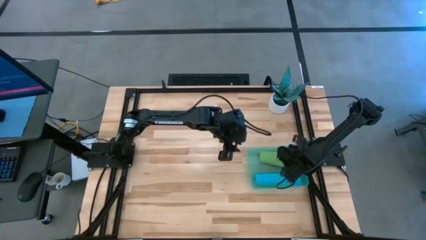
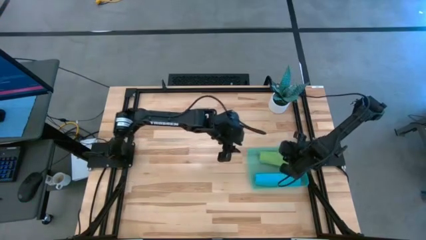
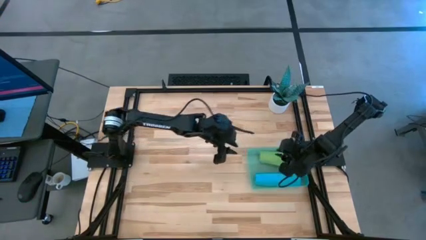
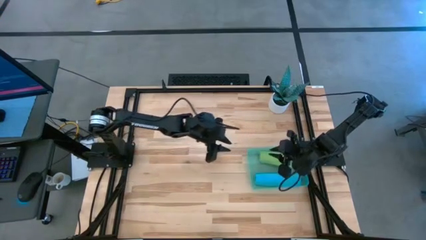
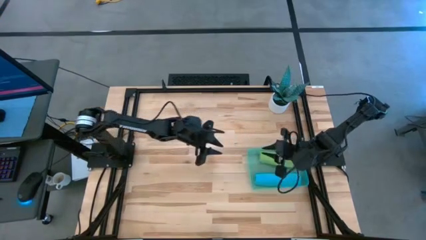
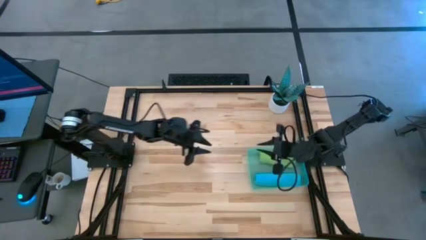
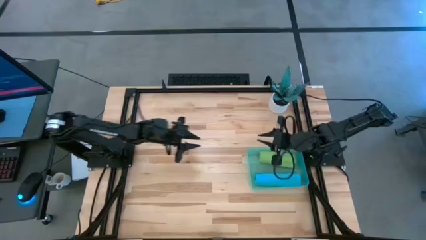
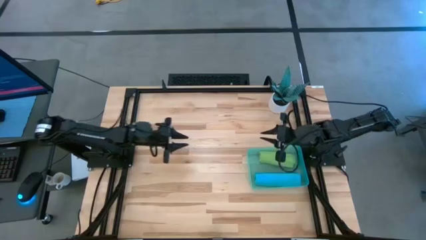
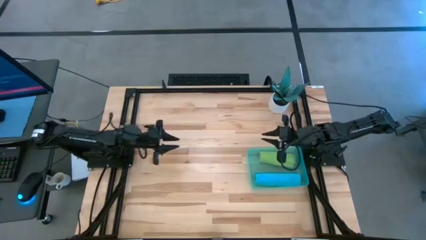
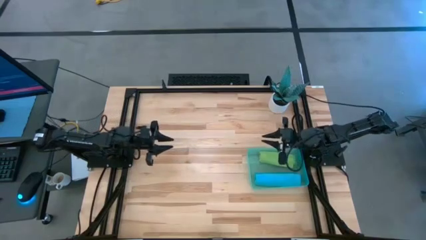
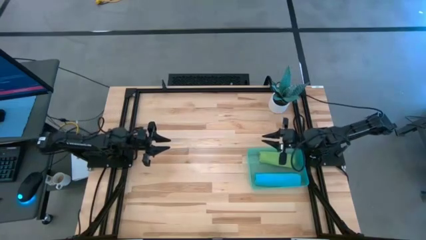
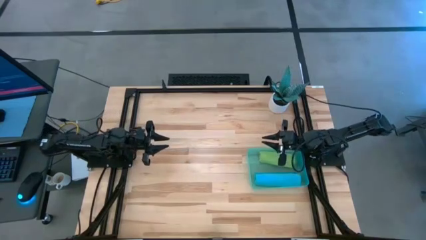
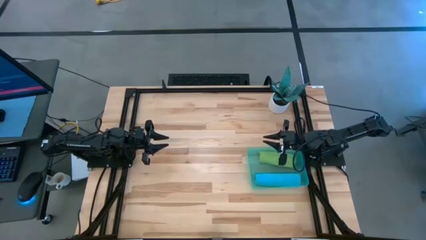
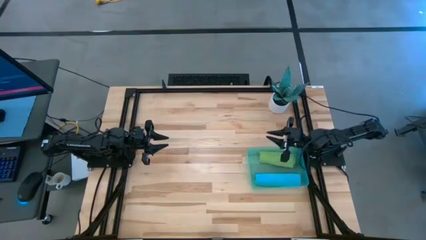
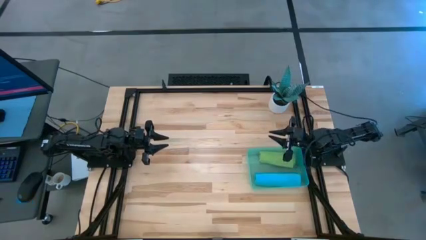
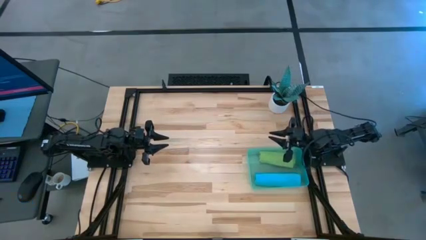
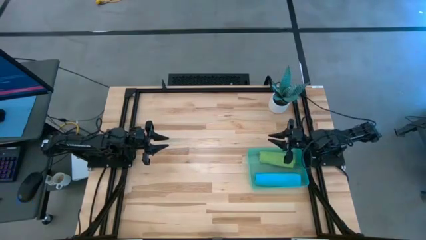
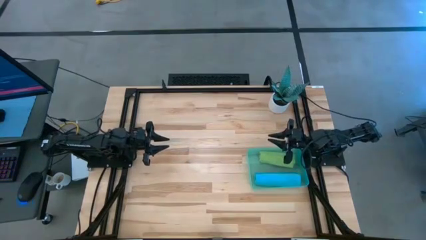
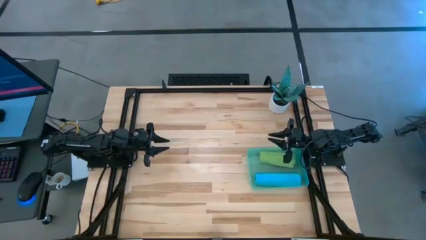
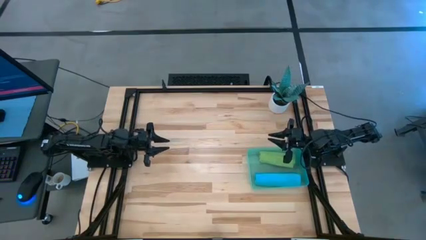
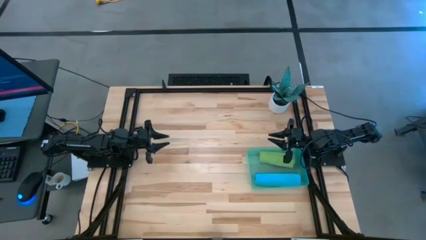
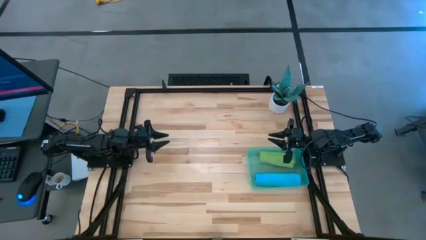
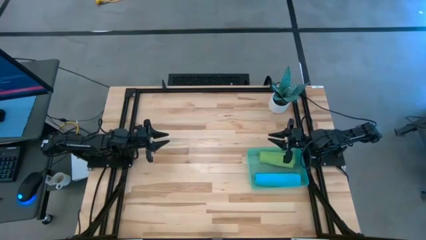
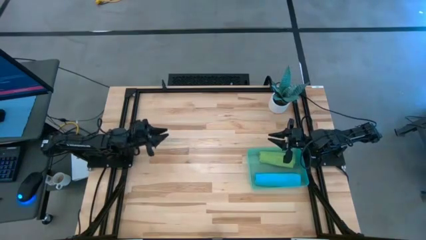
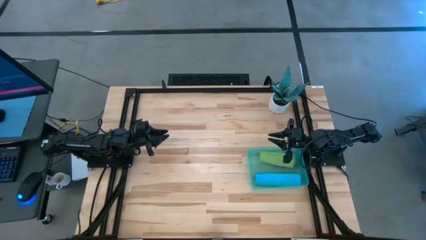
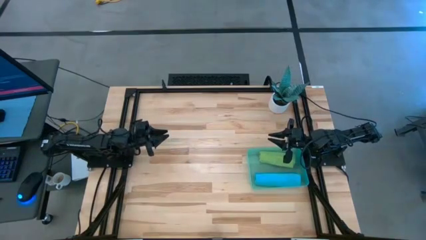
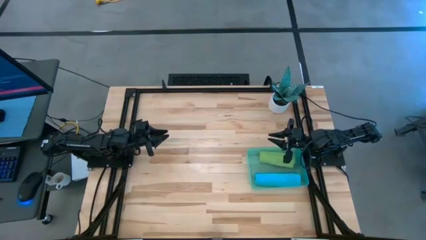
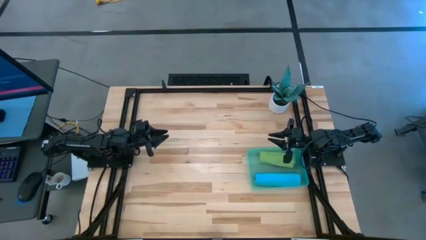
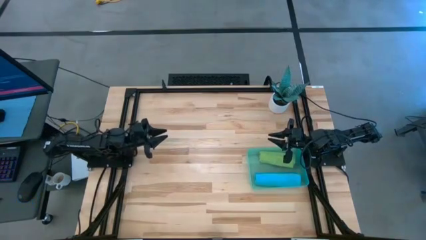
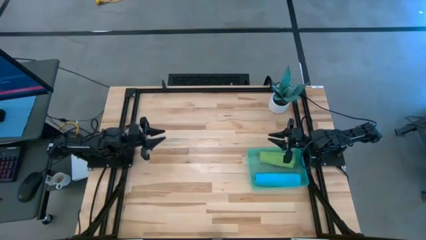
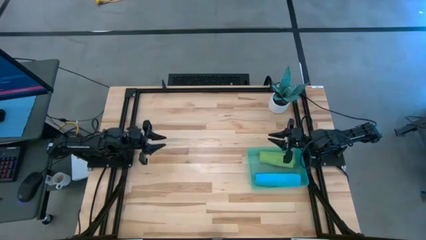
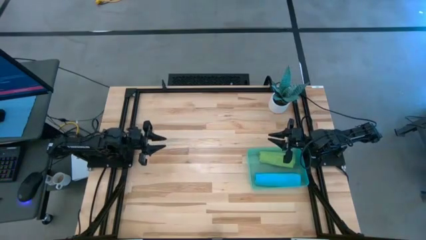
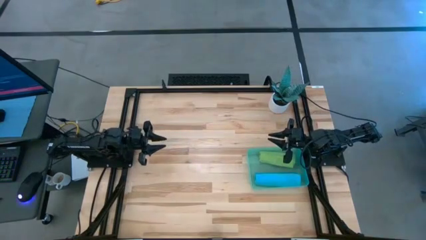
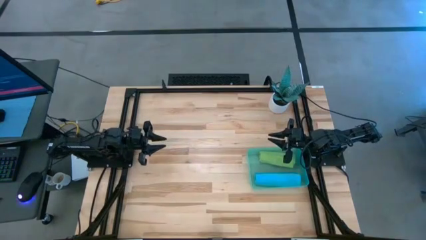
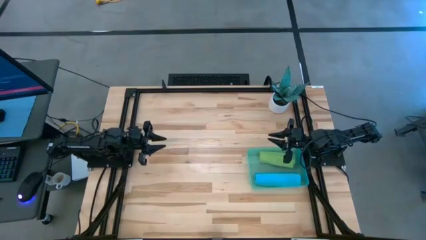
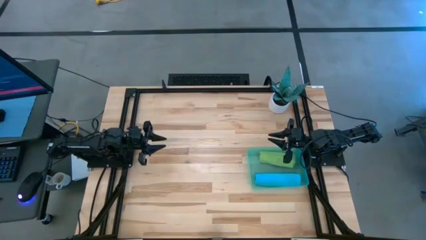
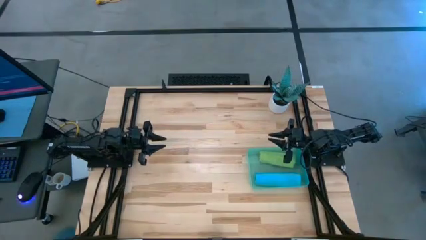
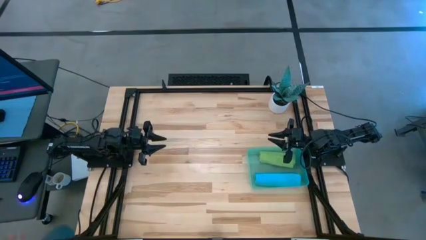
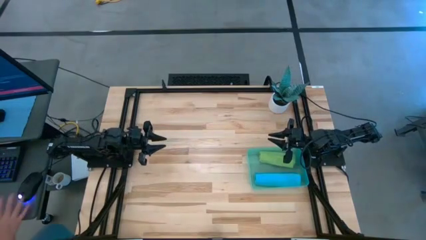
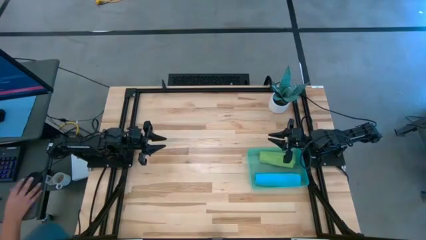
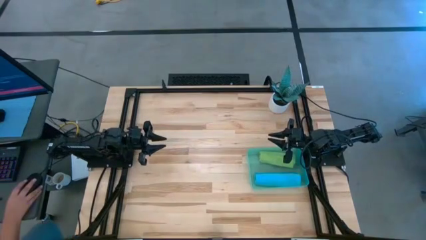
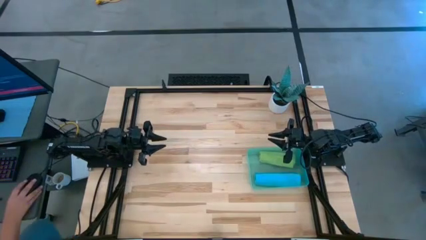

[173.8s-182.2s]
Task: Roll microfiber towels into tight, uniform cylinder then place into a basket
Return to Home Position

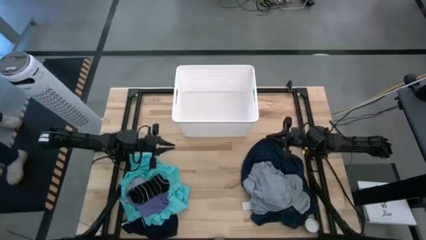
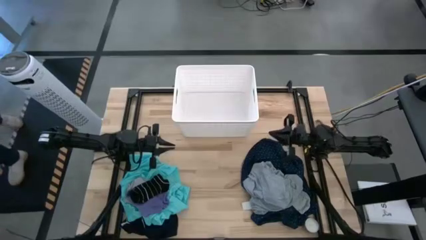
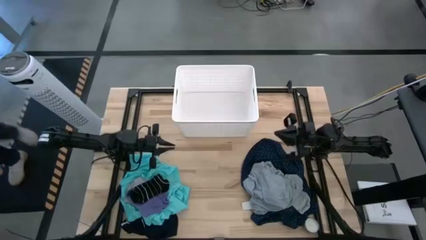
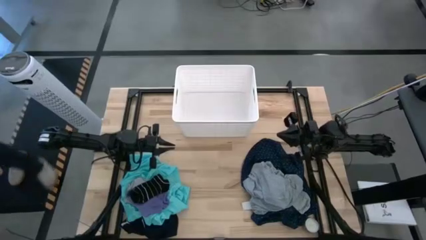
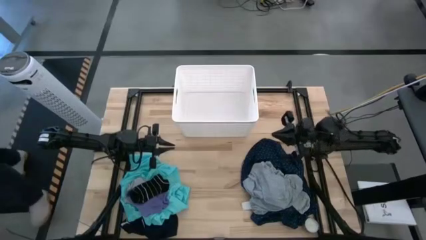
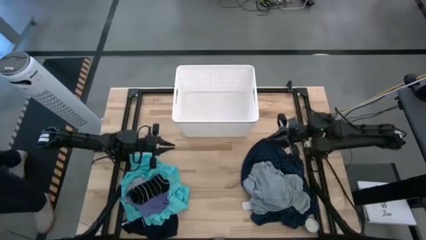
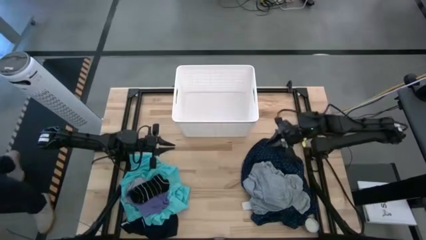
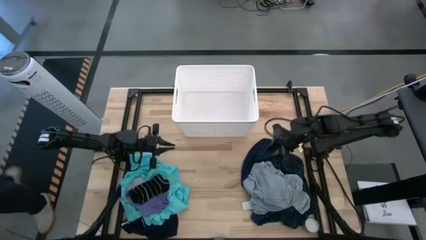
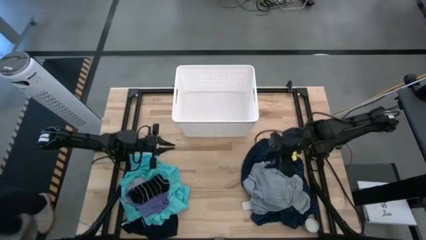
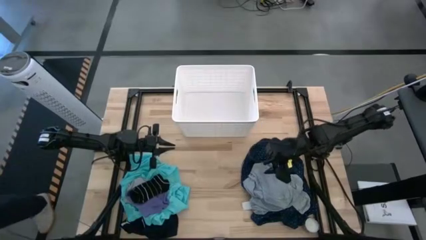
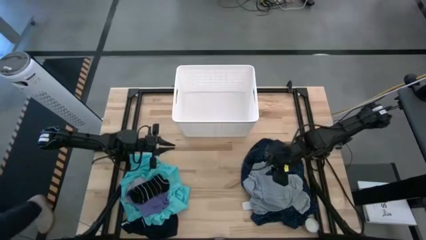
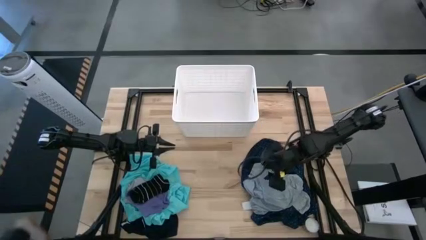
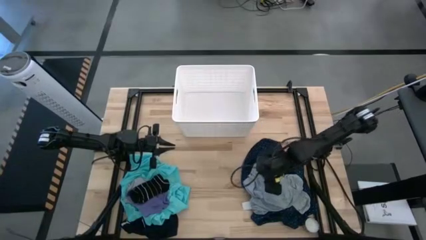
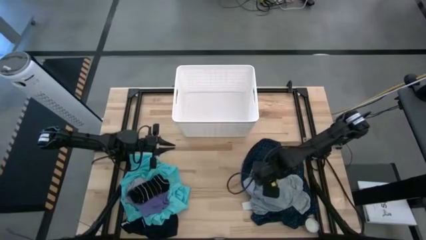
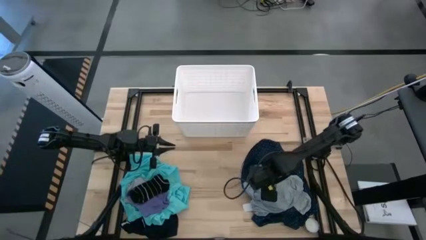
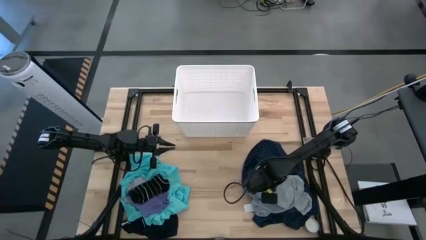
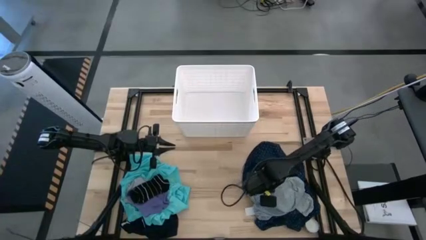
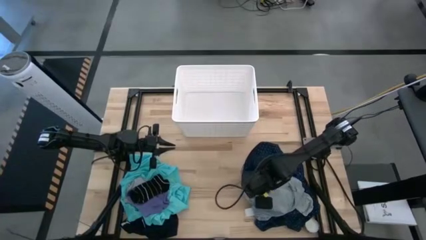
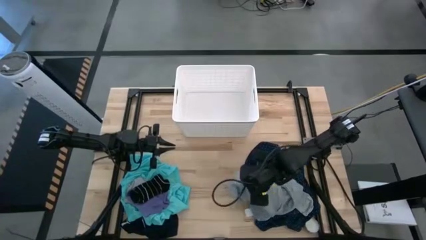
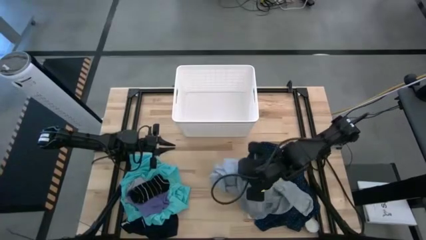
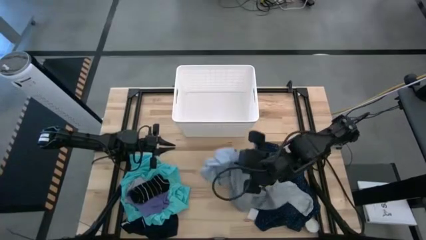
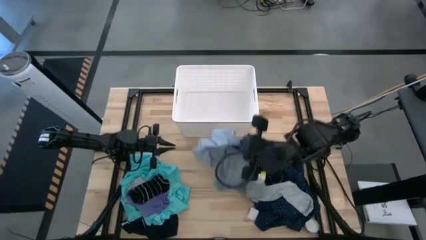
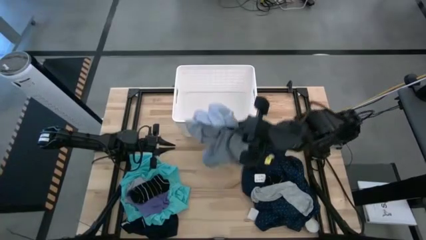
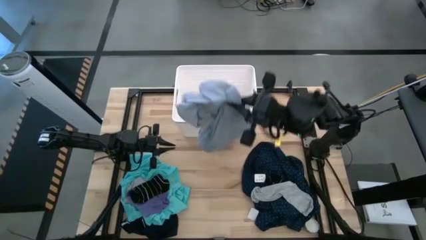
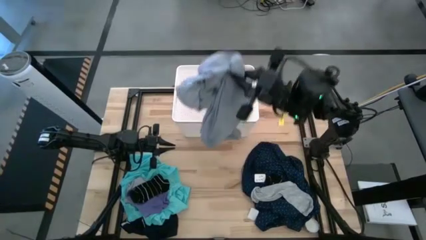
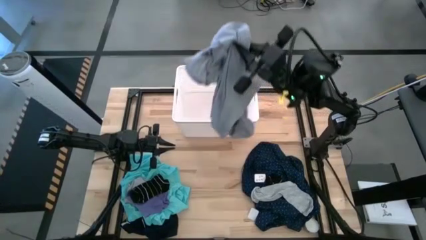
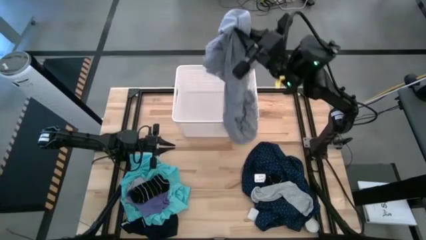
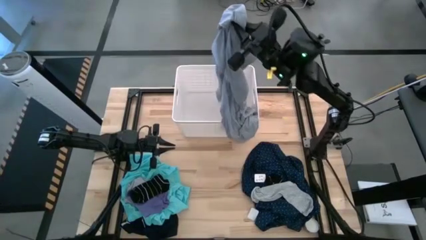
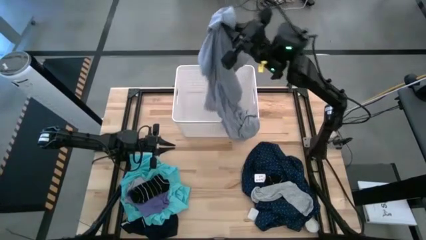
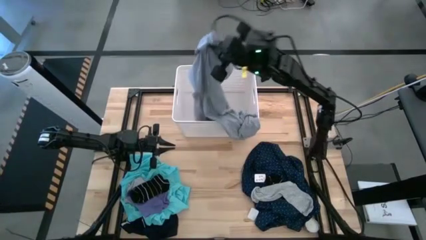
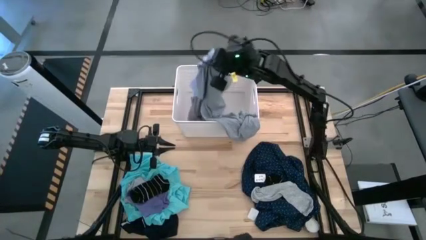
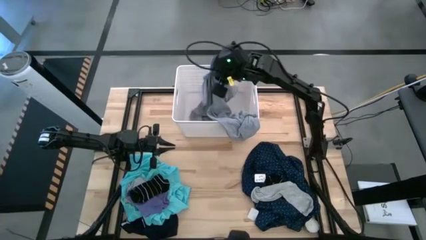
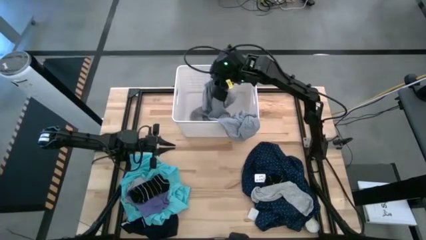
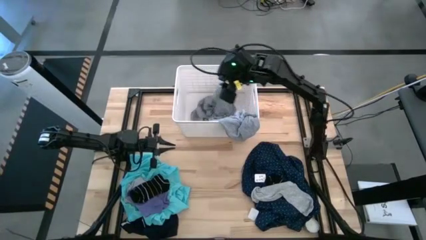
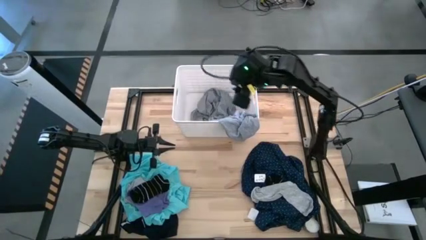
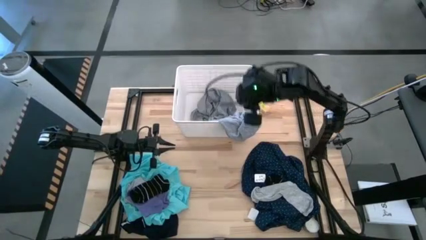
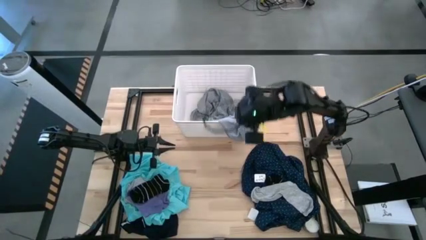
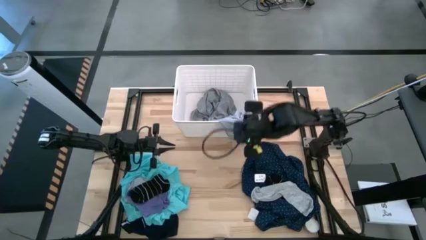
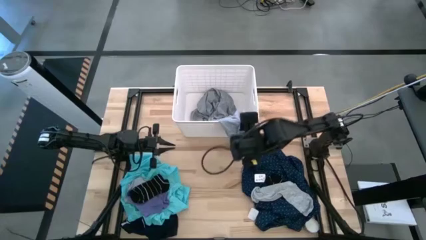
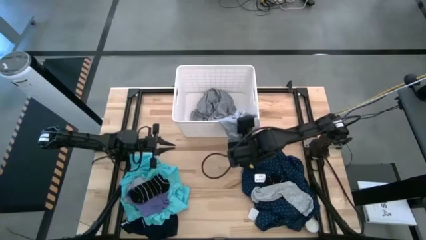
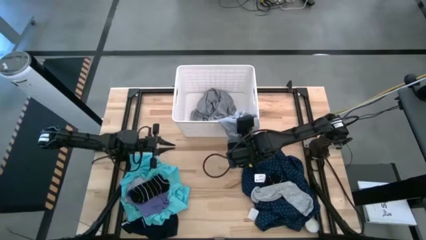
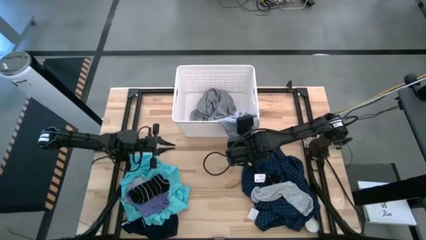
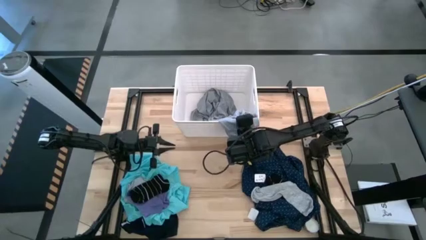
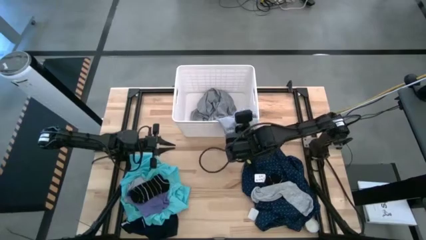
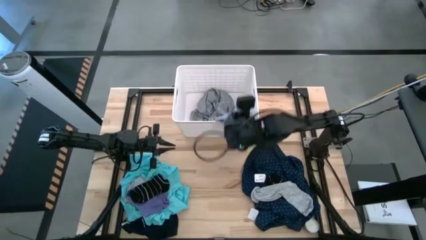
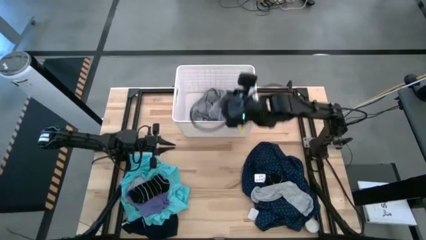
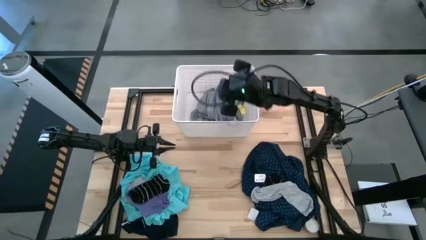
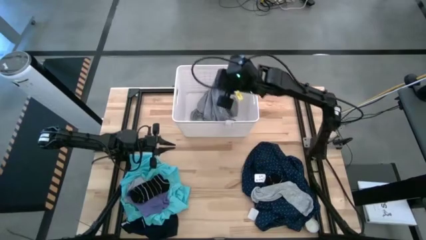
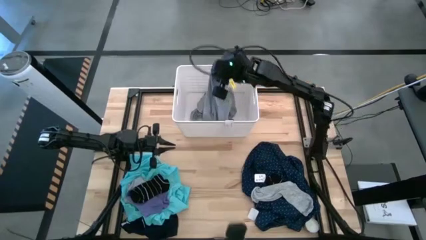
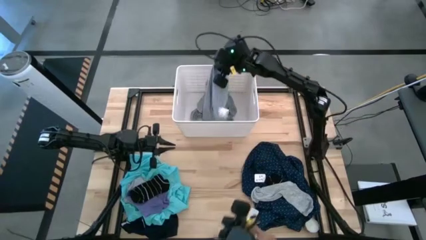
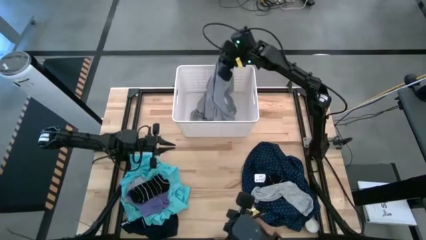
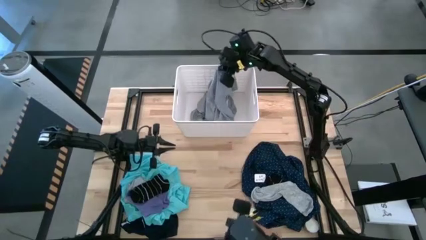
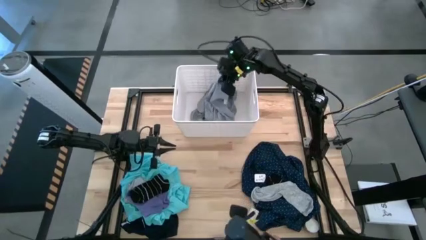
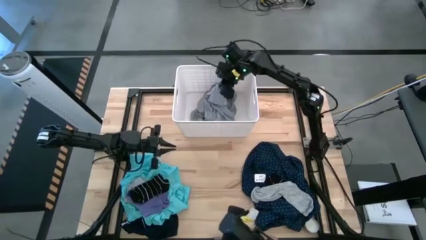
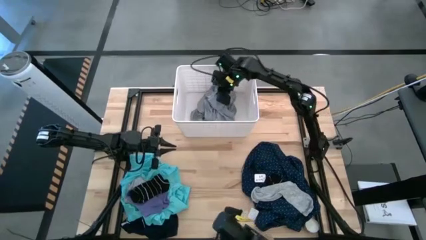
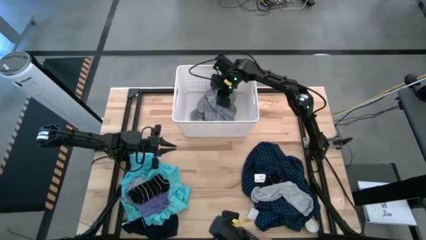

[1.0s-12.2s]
Task: Sort clothes
Put the gray shirt into the white laundry bin
